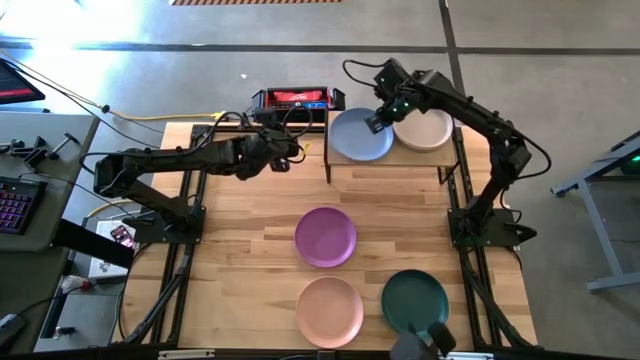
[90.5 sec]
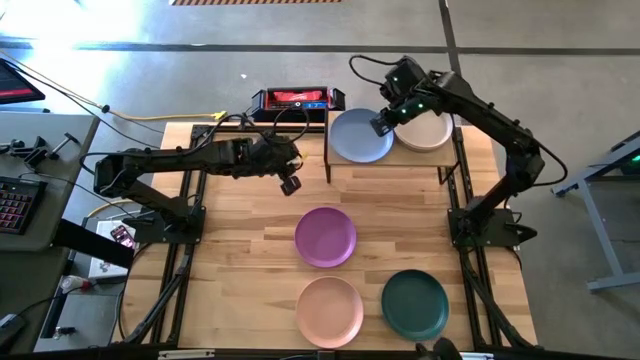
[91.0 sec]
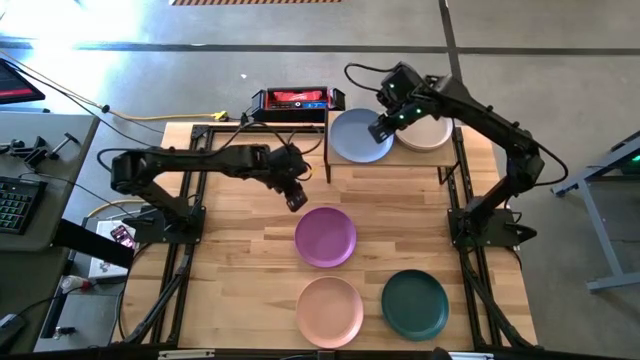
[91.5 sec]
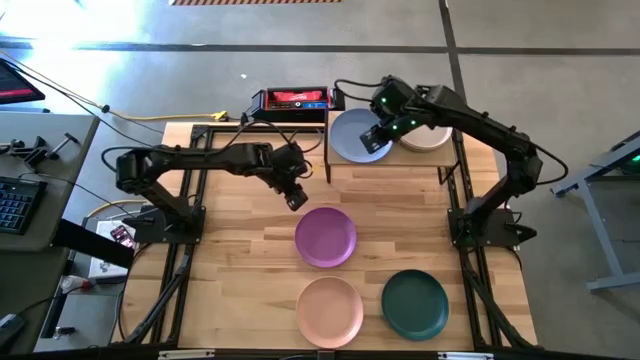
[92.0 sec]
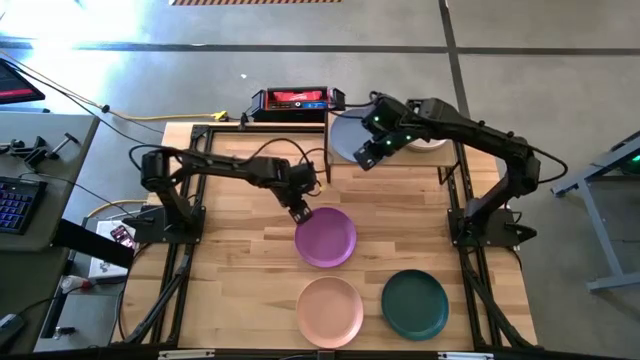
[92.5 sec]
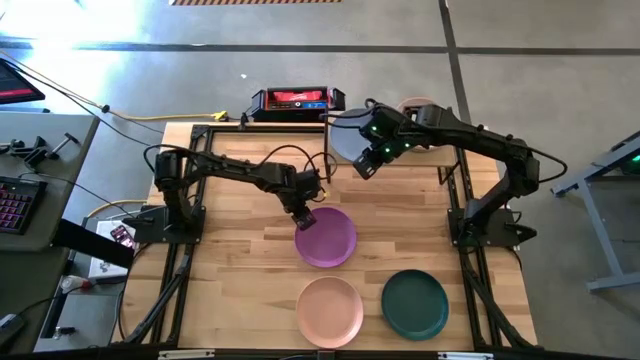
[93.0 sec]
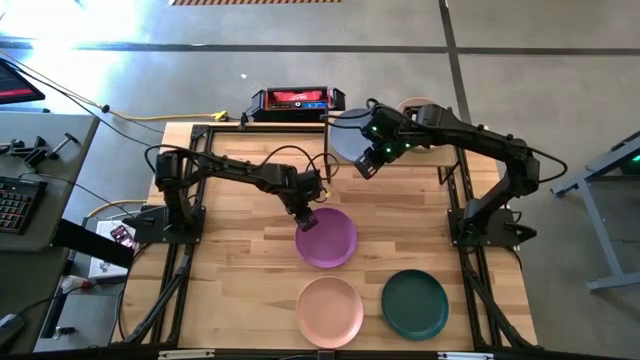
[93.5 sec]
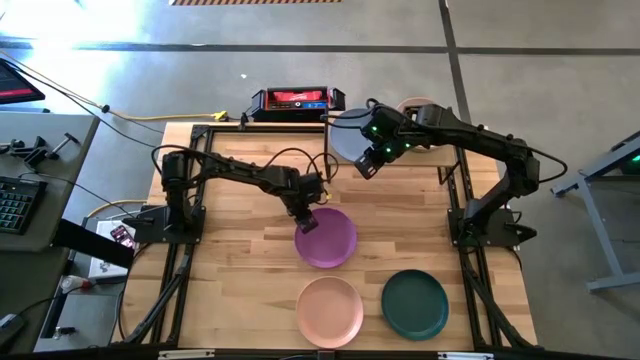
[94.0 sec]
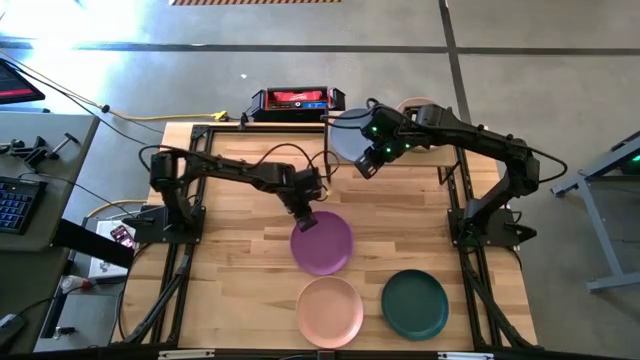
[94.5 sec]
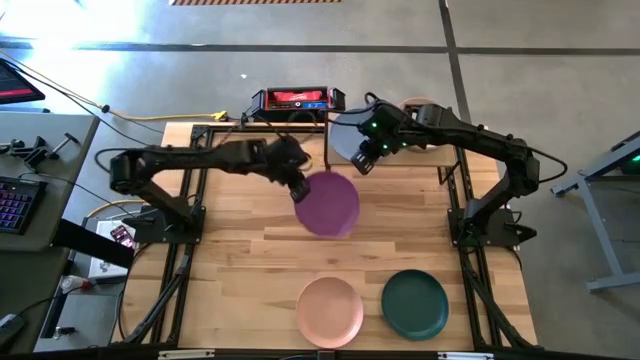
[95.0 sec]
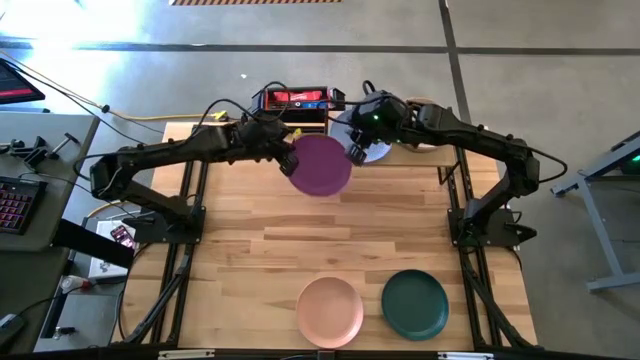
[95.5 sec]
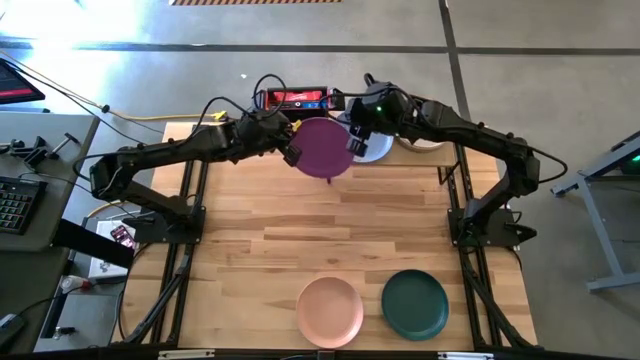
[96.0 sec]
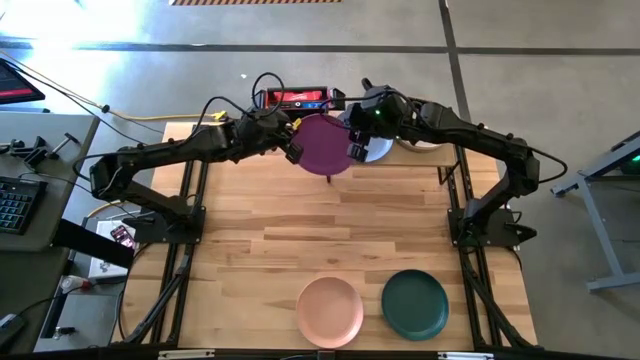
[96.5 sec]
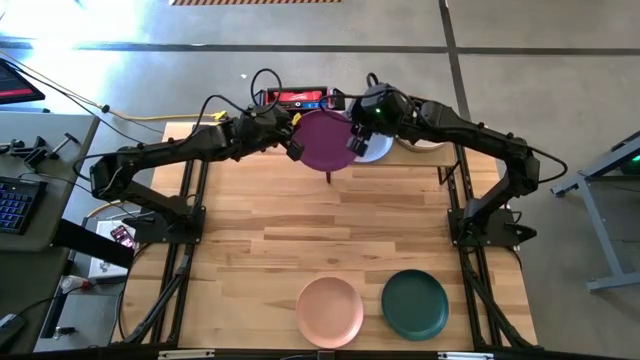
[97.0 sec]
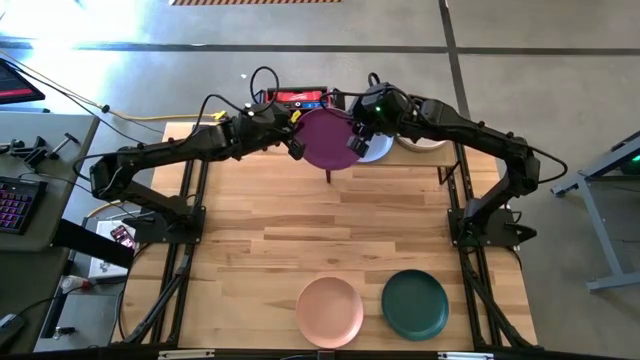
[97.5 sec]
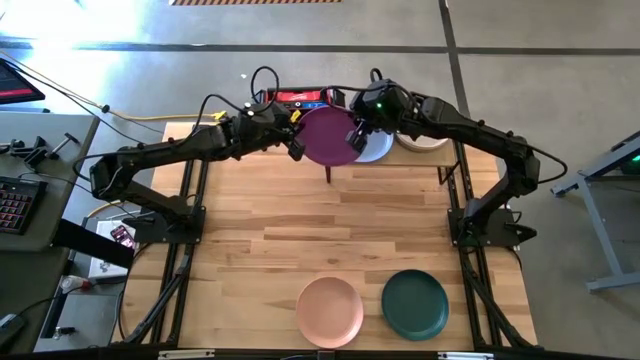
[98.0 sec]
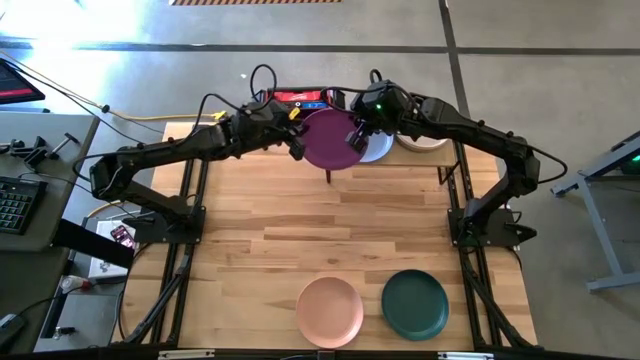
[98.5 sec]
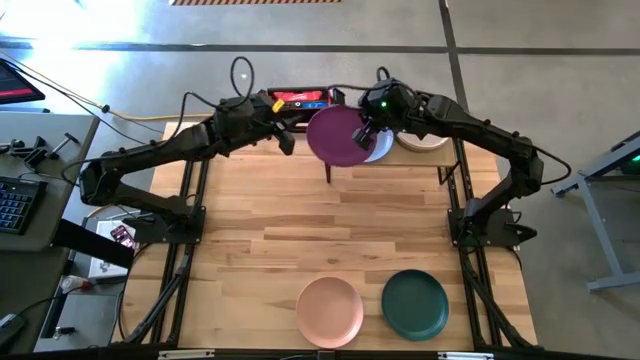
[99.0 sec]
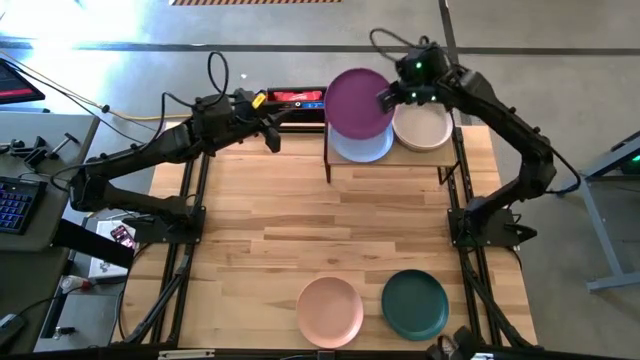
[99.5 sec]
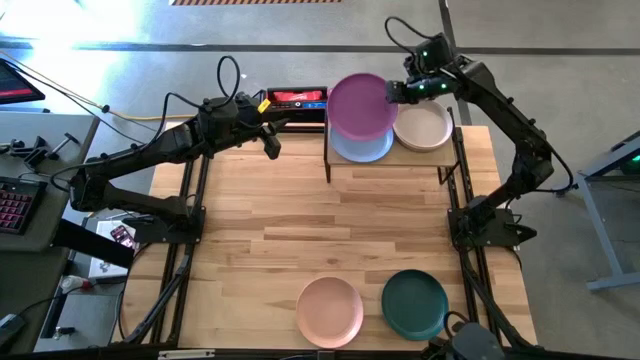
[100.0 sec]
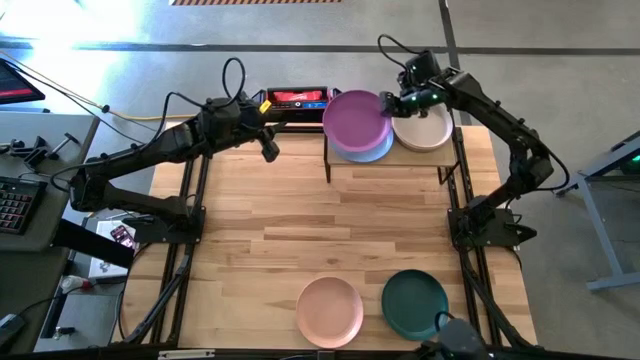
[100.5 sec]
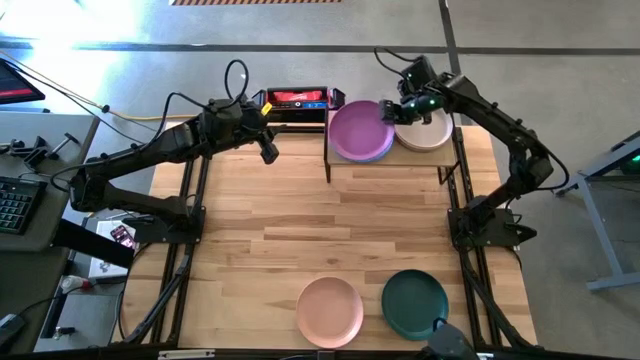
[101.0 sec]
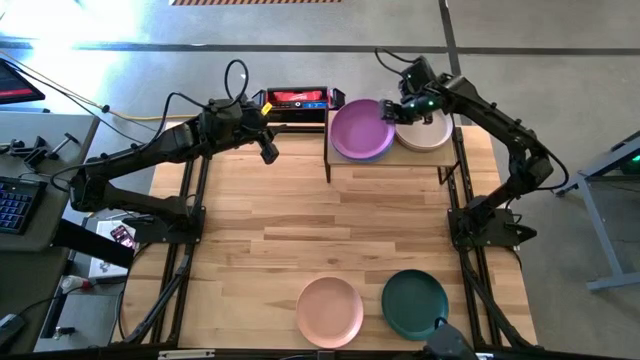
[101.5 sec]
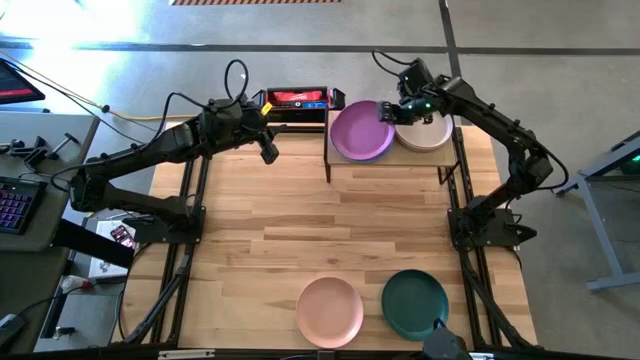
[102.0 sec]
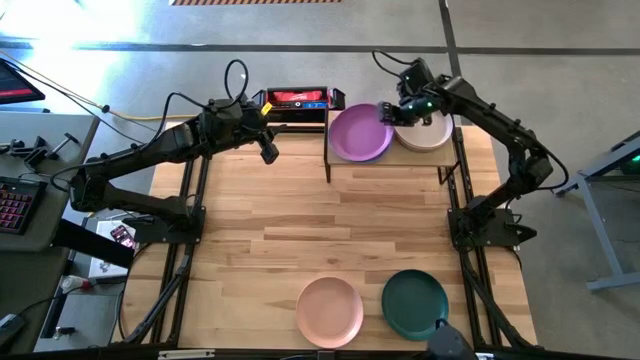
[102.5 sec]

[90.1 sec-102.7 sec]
Task: Place and stack plates onto a shelf
Stack the purple plate on top of the blue plate on the shelf

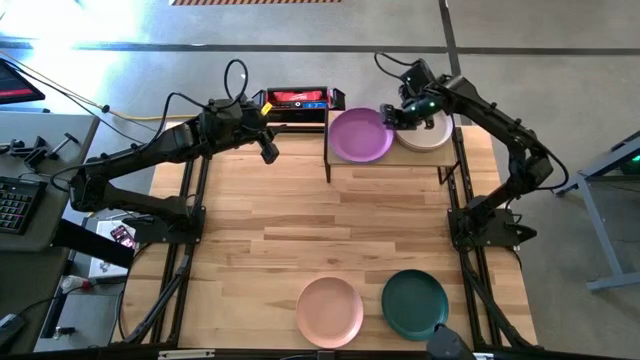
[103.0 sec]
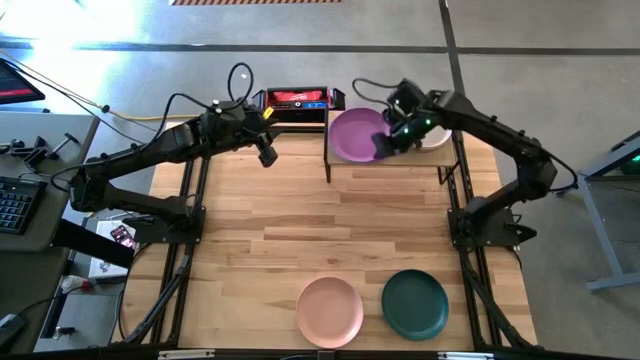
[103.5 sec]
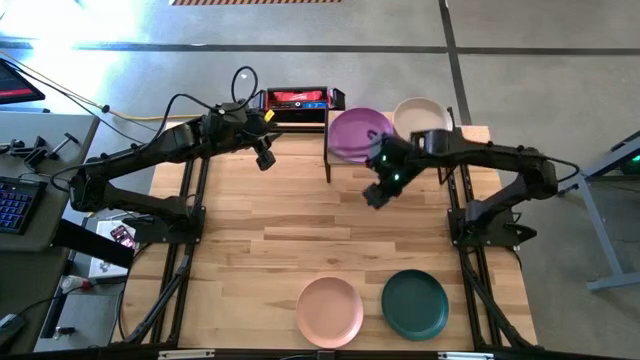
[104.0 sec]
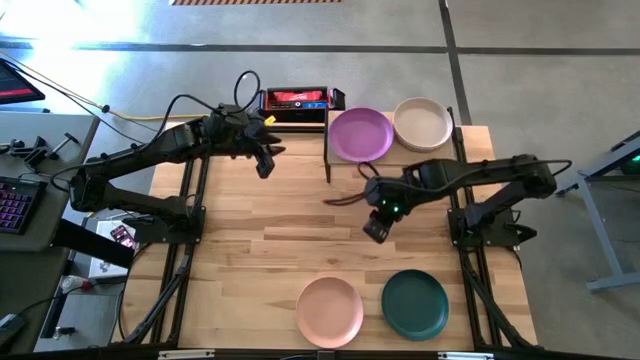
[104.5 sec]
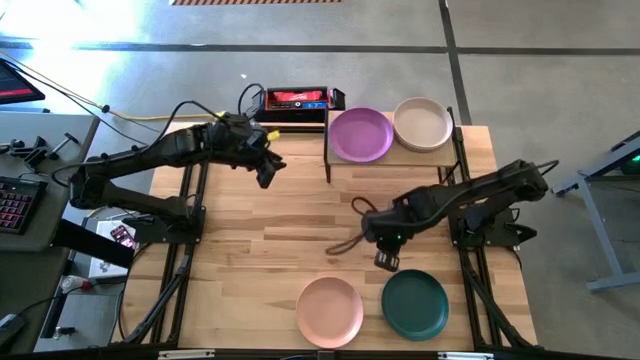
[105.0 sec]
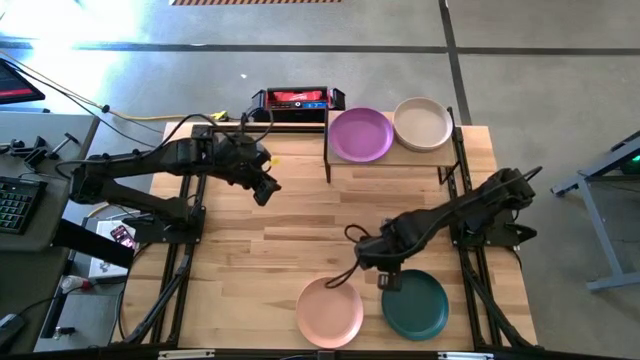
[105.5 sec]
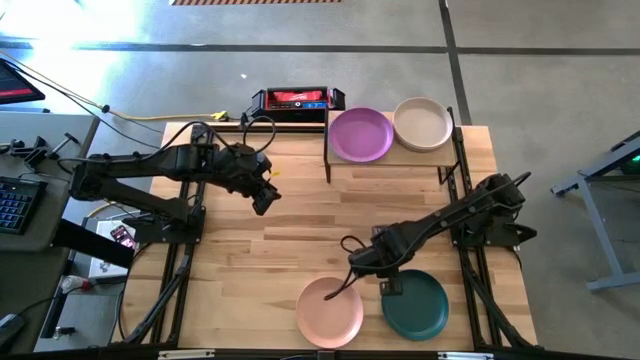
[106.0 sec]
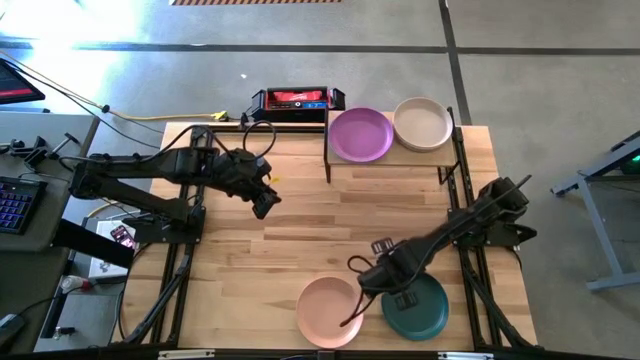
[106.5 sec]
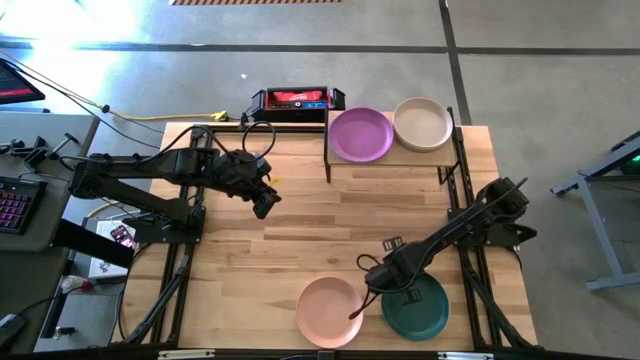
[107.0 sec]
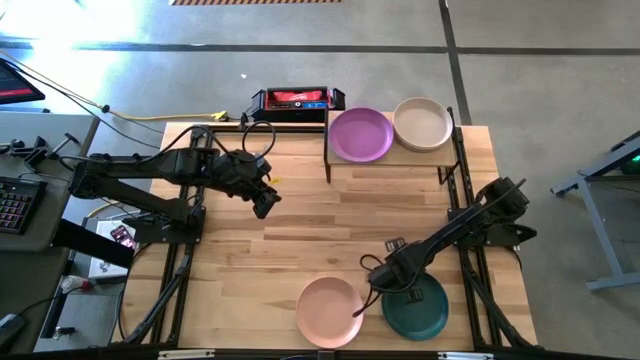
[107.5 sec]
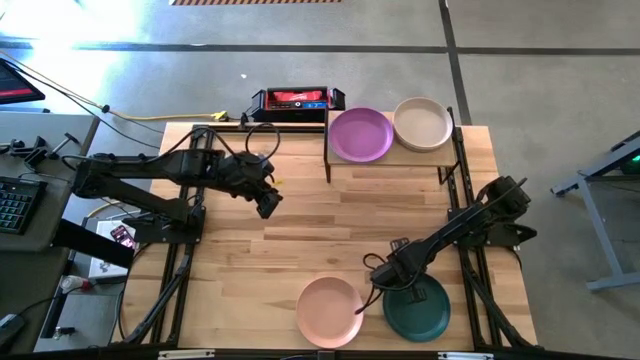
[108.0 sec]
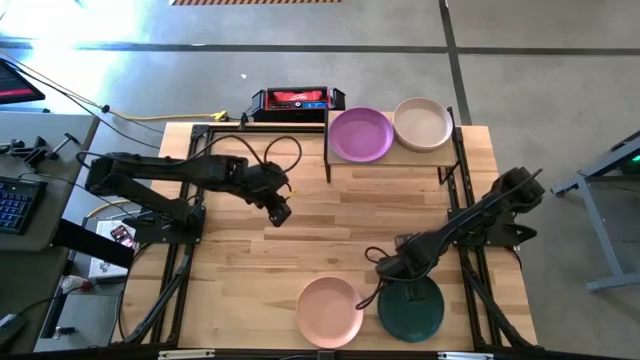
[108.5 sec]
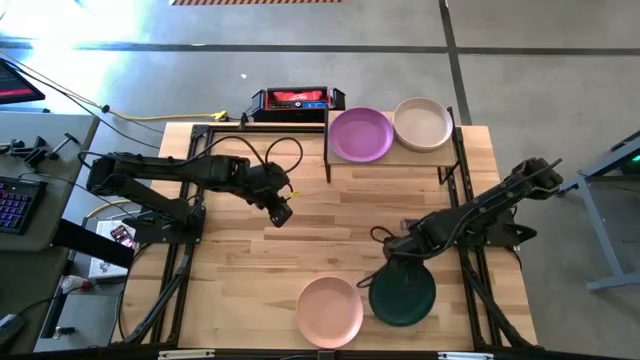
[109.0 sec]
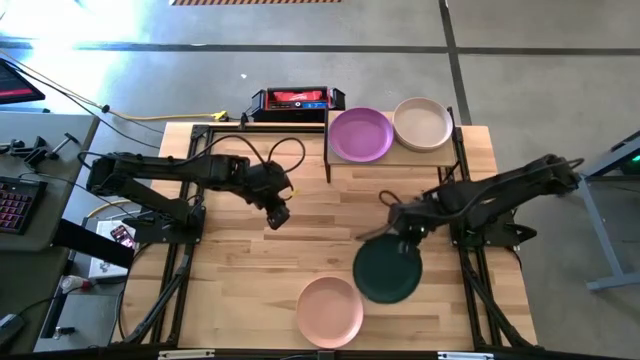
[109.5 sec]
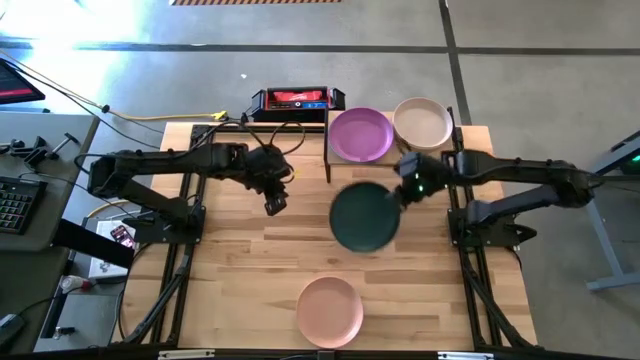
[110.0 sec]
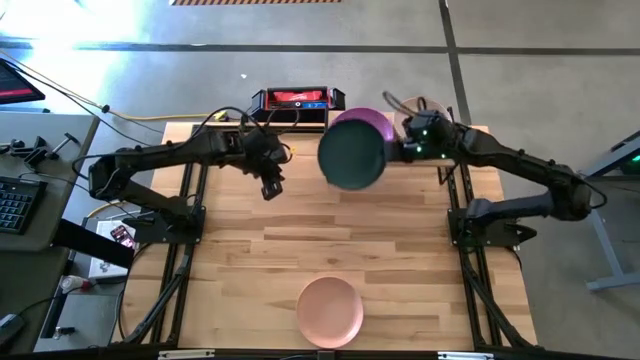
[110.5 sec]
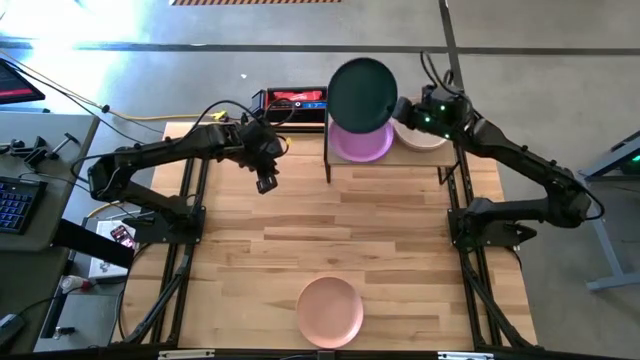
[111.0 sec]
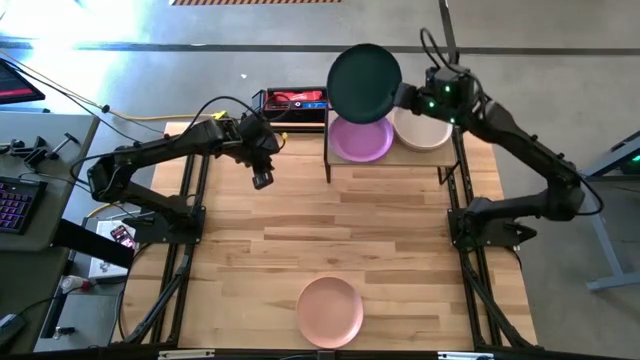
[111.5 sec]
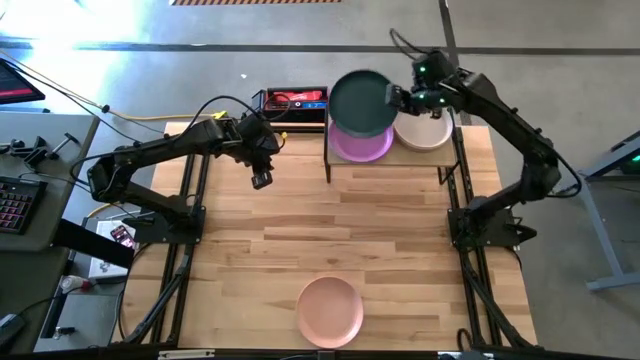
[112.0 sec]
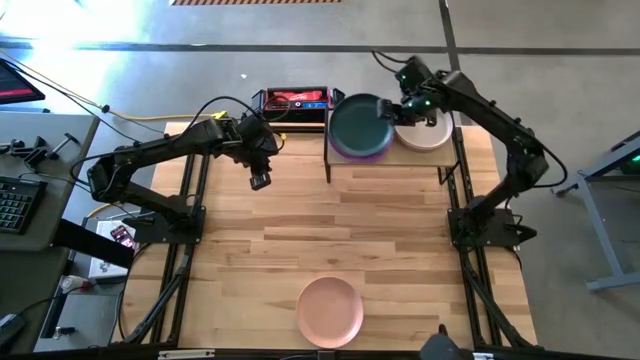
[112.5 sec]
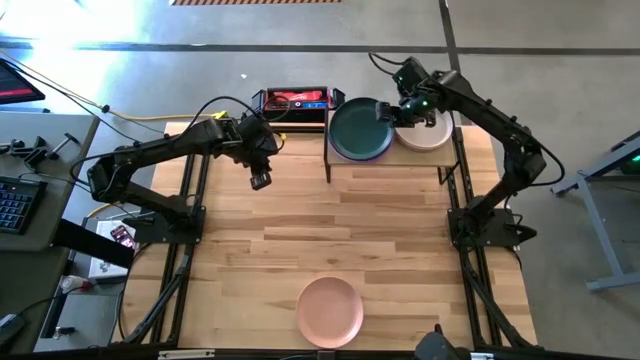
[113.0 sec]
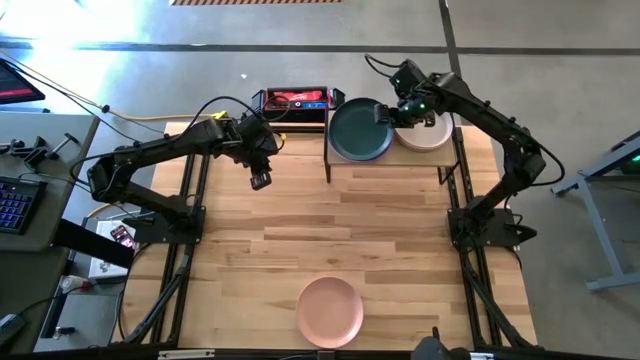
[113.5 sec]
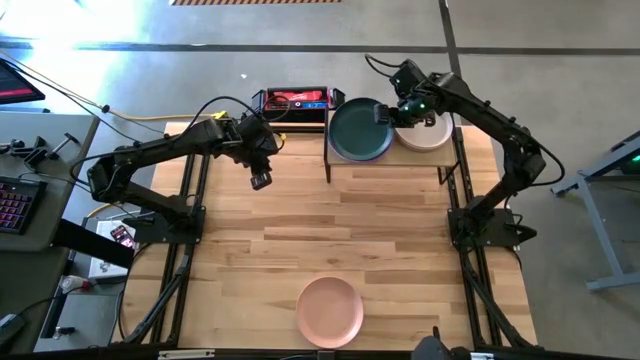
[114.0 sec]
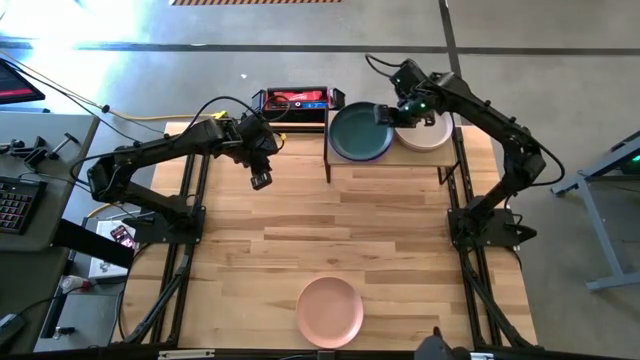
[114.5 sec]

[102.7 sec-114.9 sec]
Stack the green plate on top of the purple plate on the shelf
